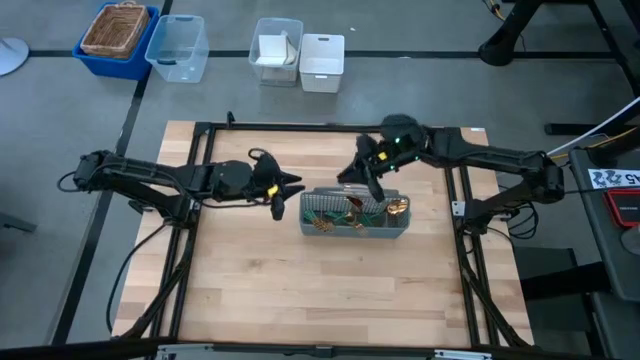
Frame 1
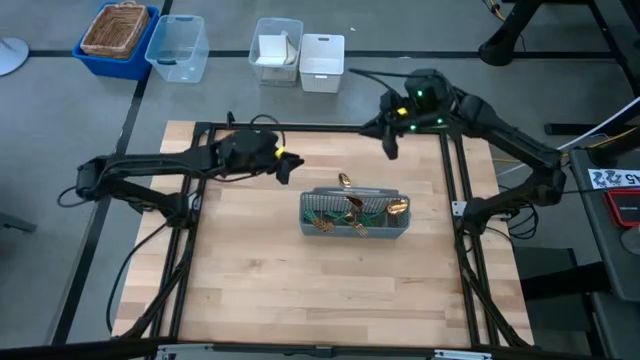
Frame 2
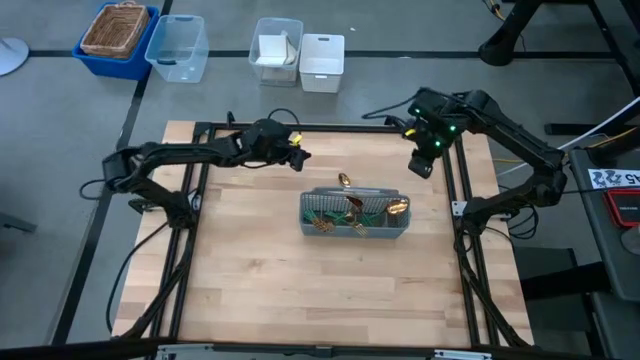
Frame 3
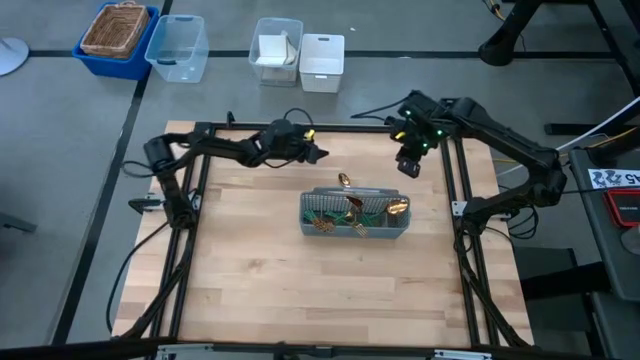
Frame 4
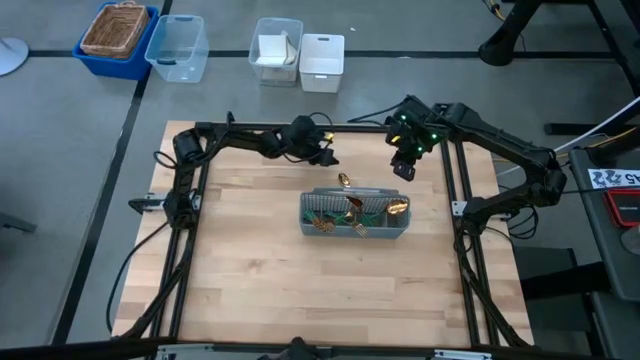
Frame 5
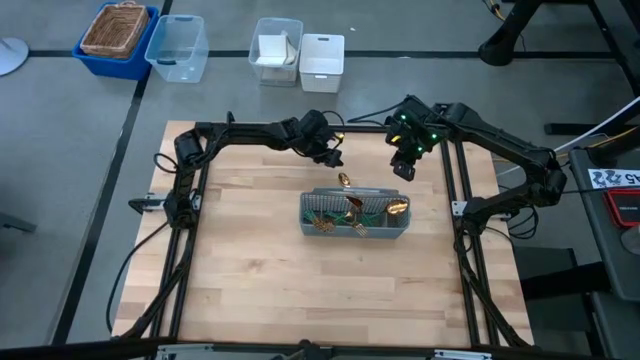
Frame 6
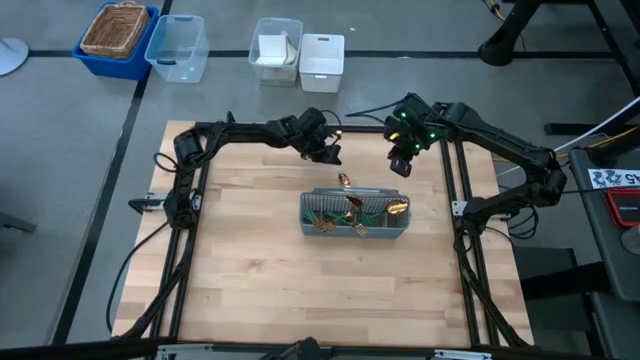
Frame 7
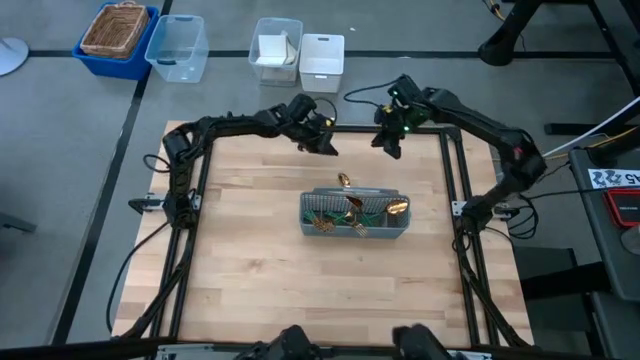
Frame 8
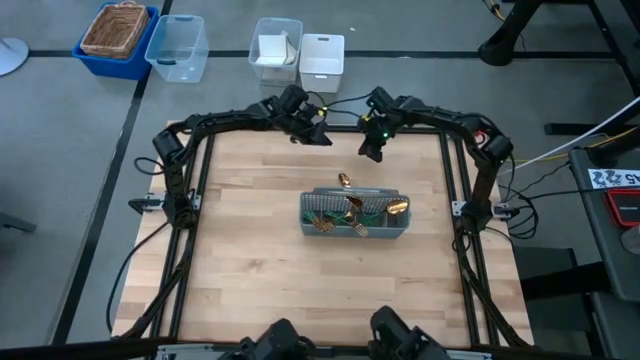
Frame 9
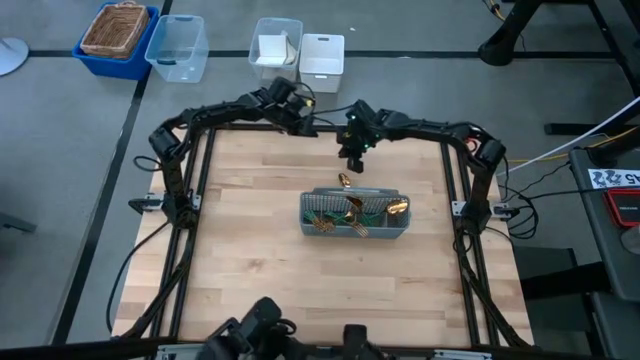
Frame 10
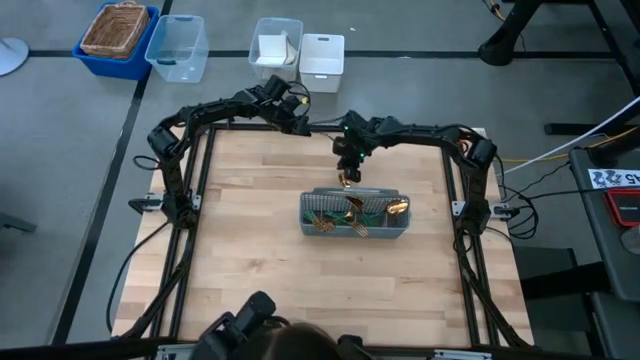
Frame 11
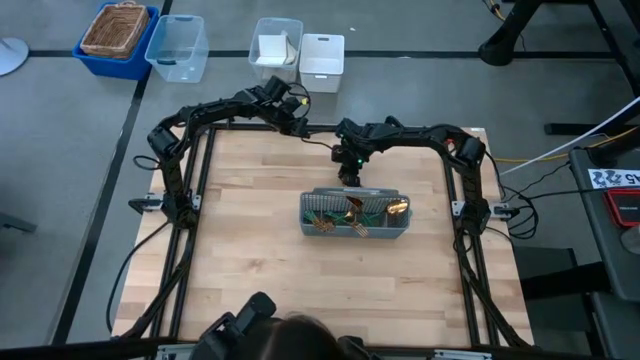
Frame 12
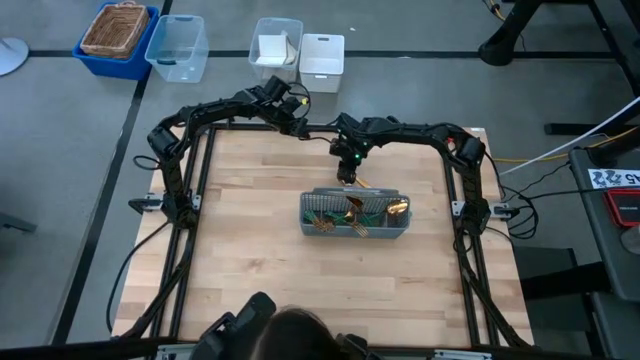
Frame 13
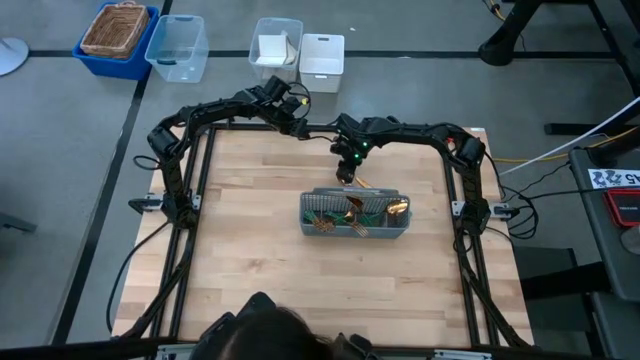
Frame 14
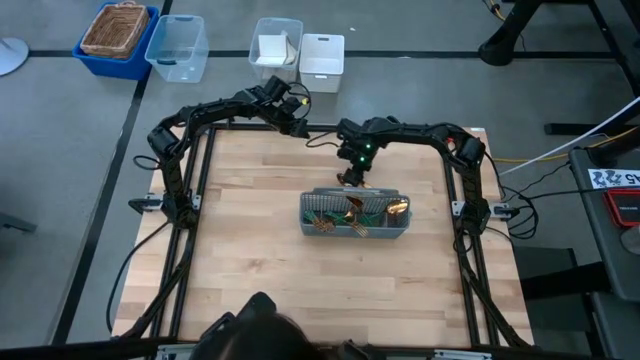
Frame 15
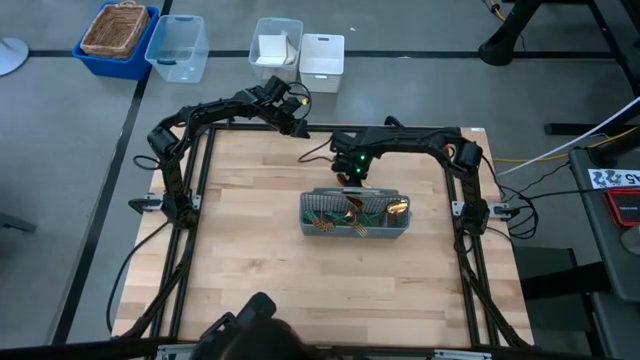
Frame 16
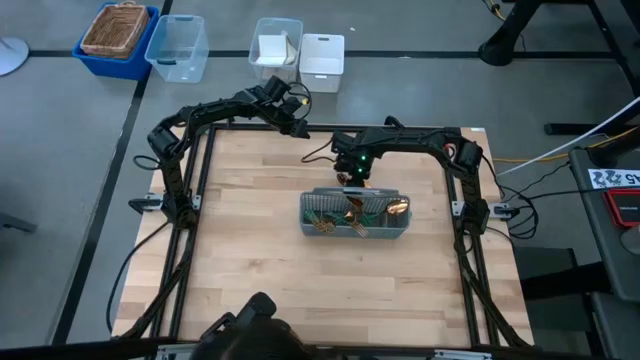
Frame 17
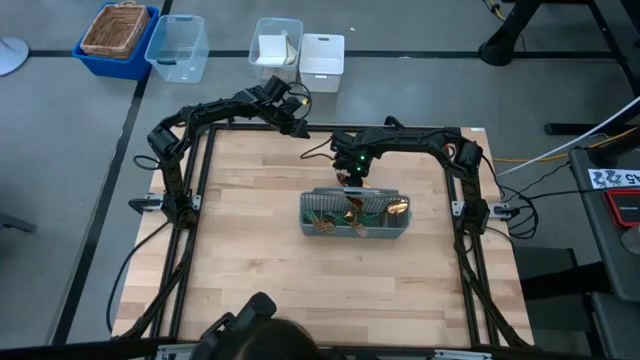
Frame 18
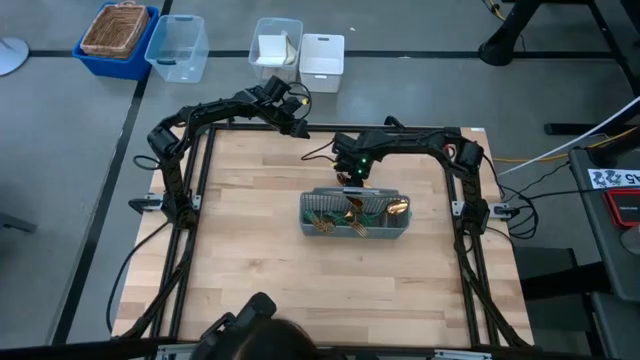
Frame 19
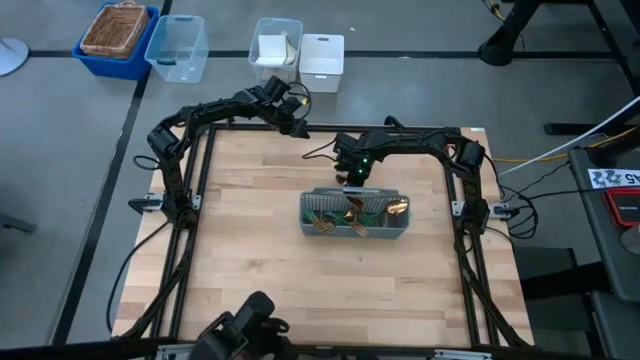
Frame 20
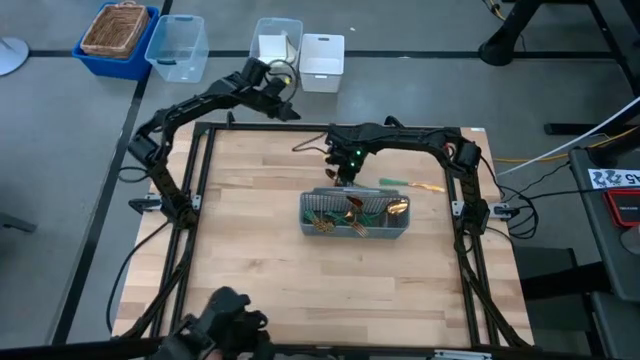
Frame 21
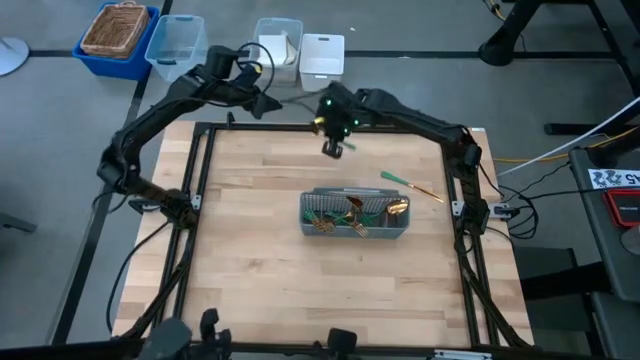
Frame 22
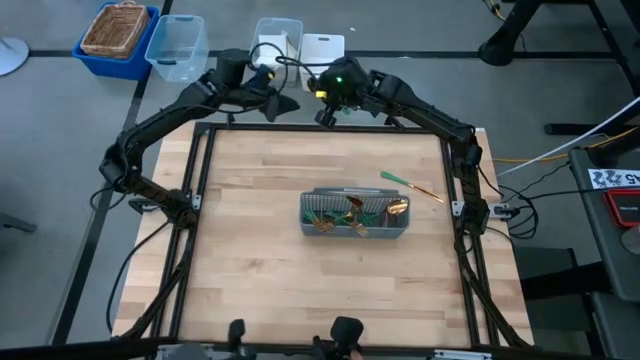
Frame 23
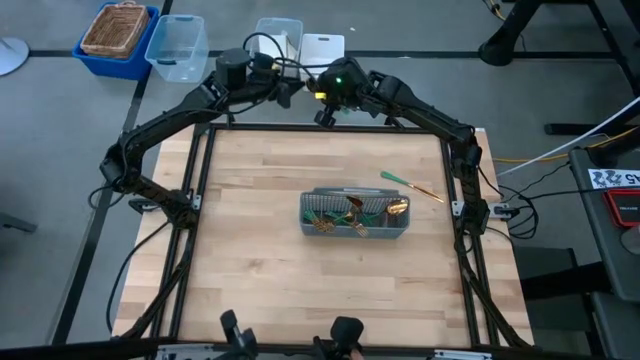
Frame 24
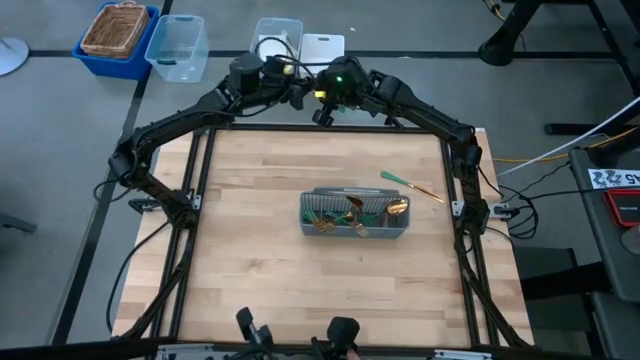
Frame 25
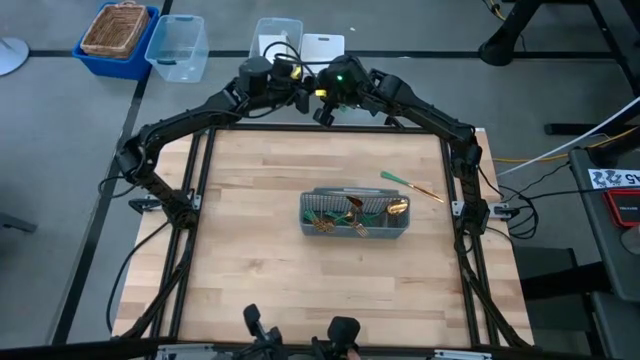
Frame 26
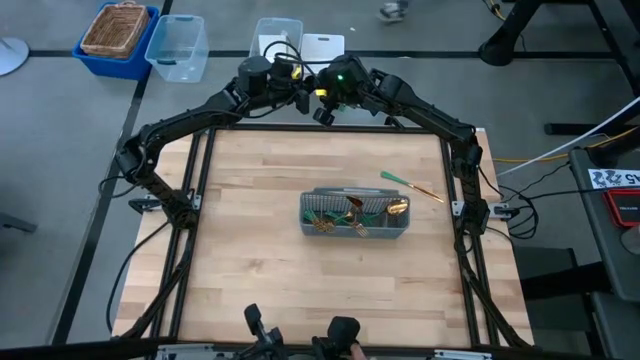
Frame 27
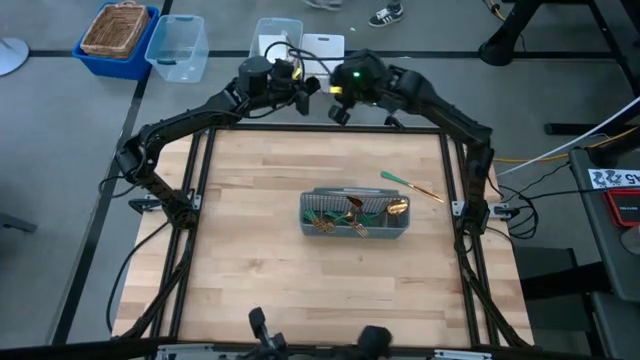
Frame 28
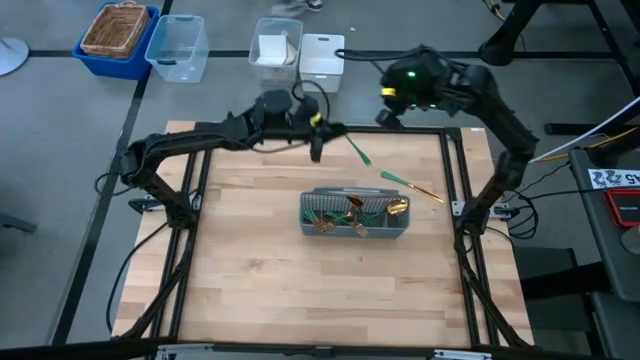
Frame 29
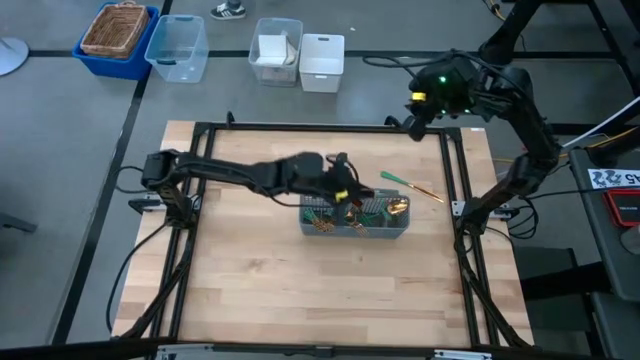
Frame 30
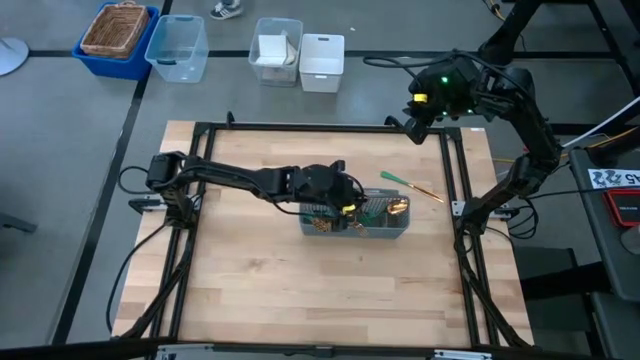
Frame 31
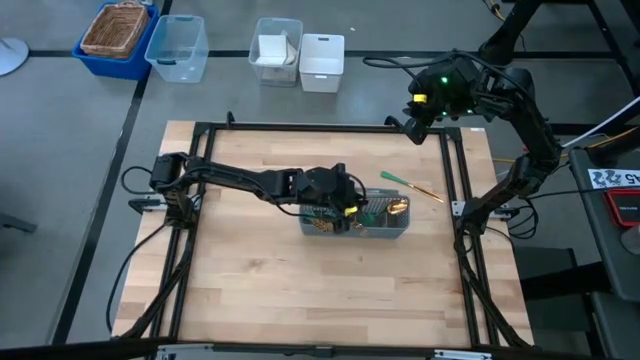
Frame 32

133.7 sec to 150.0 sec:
Task: Sort silverware
Put the green spoon into the gray utensil holder

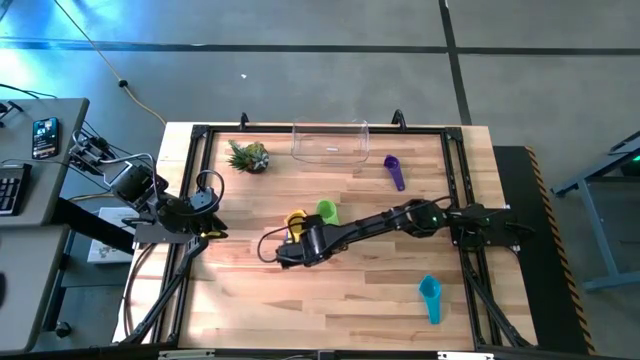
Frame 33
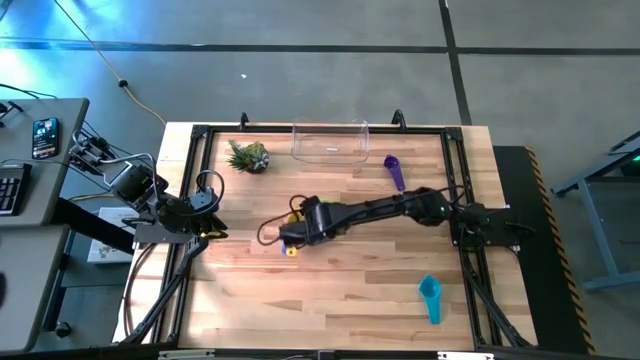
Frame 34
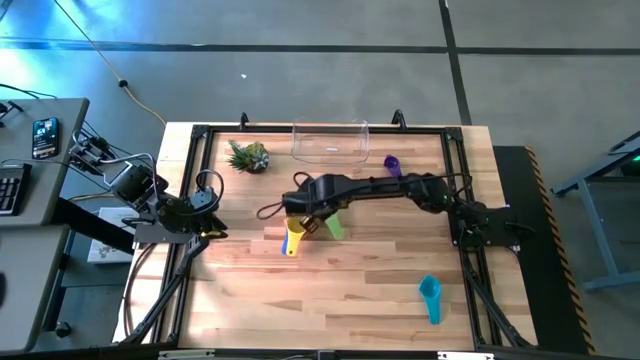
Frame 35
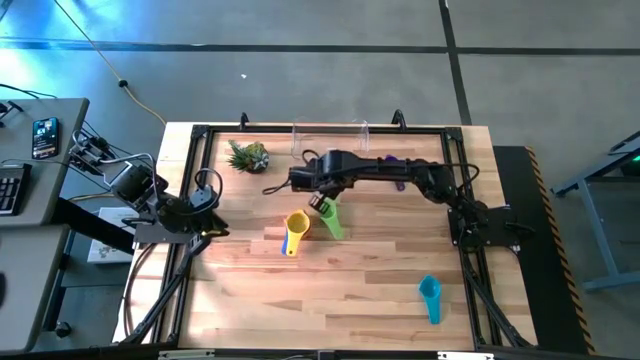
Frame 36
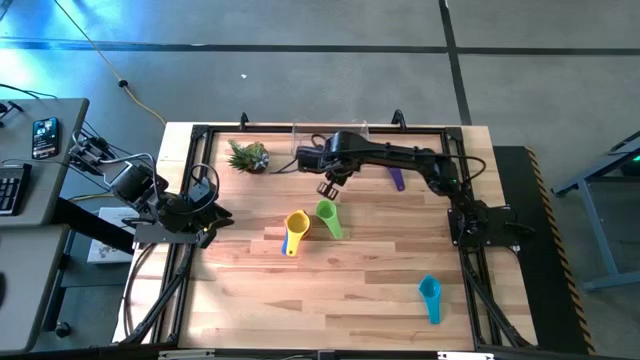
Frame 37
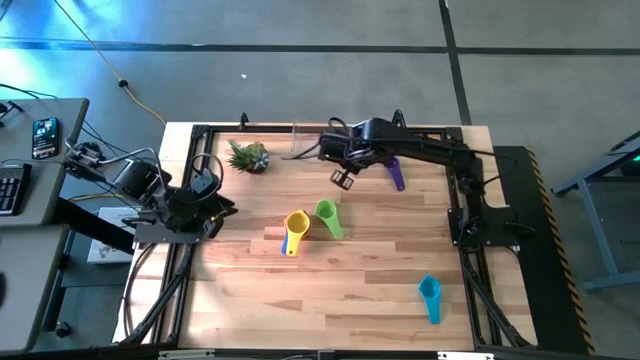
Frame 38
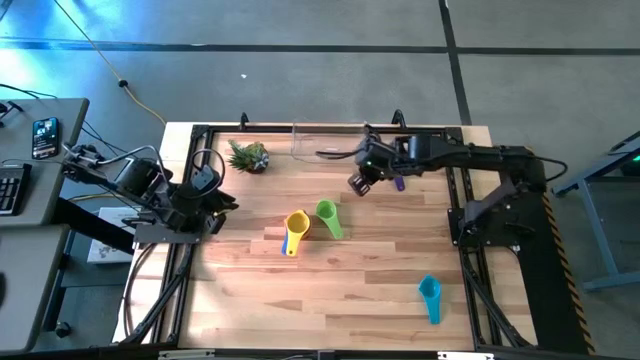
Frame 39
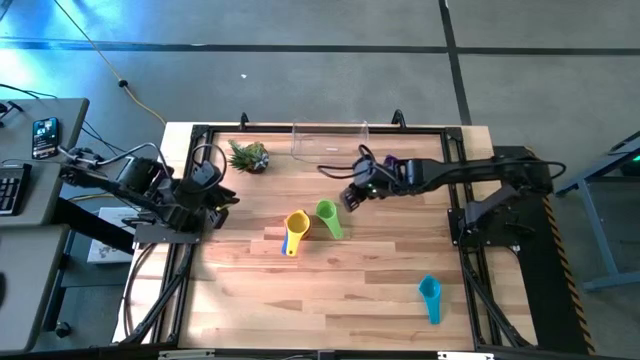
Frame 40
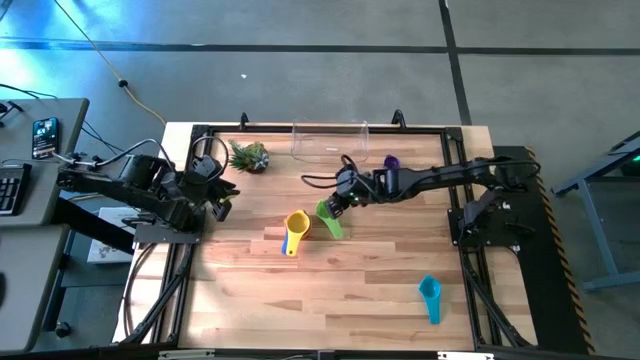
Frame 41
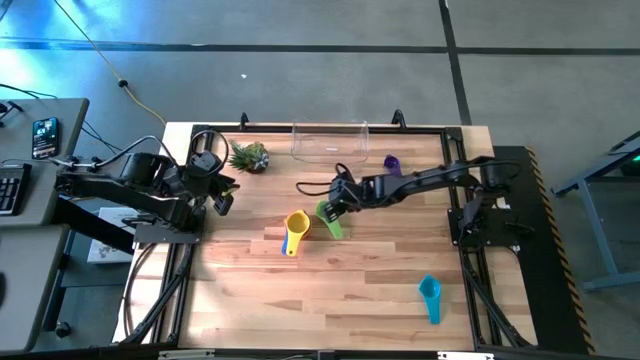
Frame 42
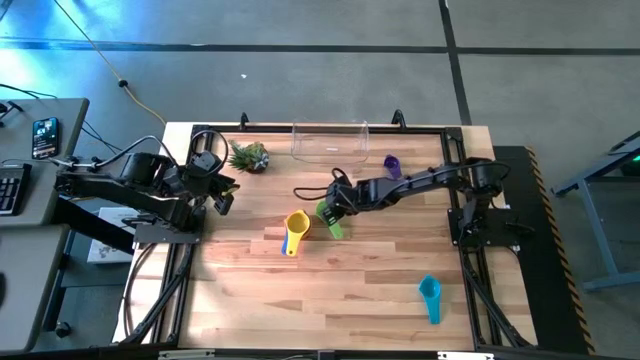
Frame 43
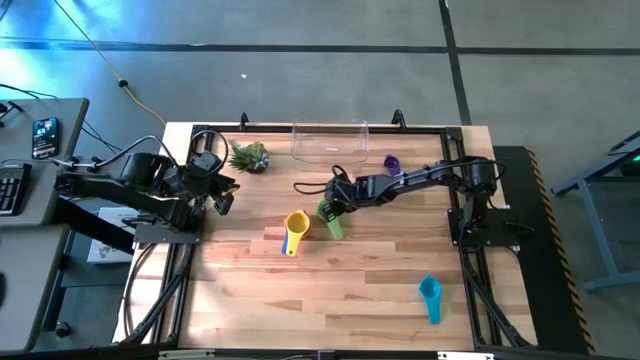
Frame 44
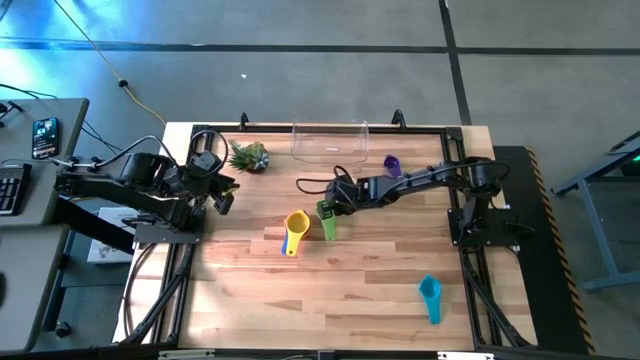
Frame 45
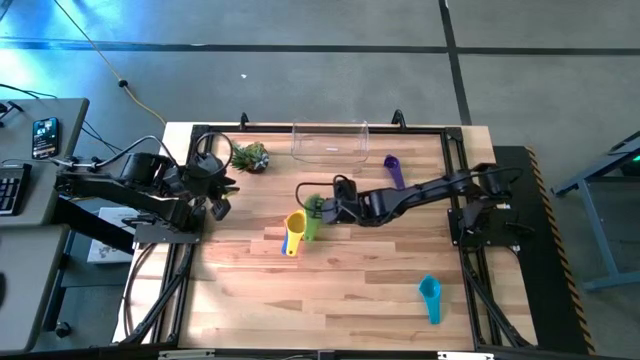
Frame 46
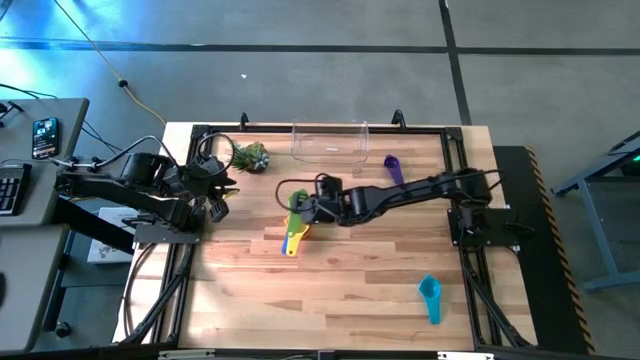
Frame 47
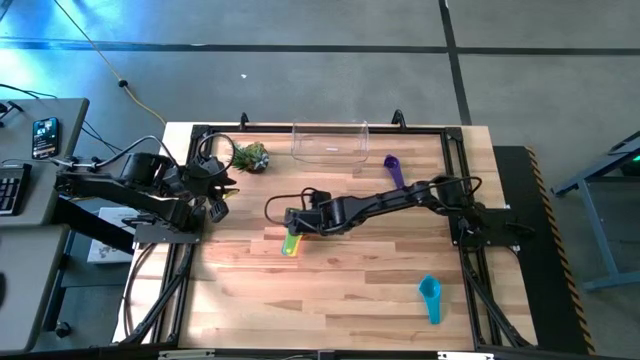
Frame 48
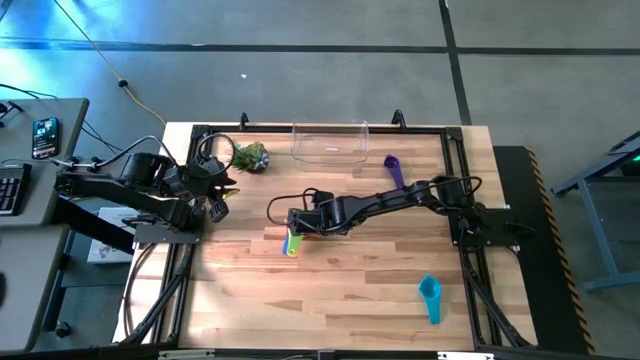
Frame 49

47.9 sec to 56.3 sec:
Task: Nest measuring cups in basket
Stack the green measuring cup on top of the yellow measuring cup
